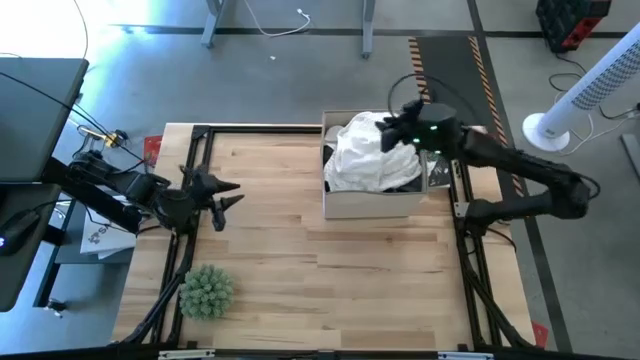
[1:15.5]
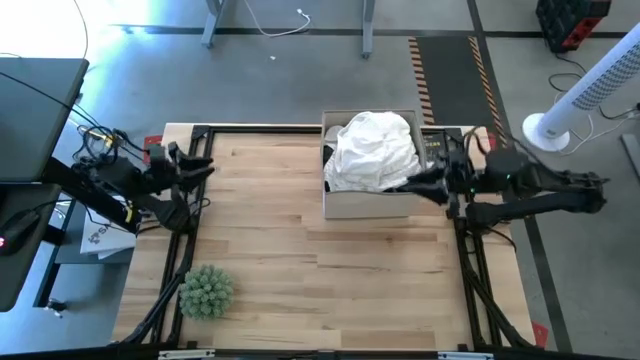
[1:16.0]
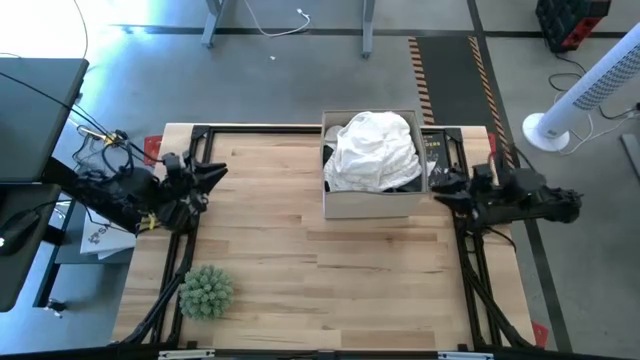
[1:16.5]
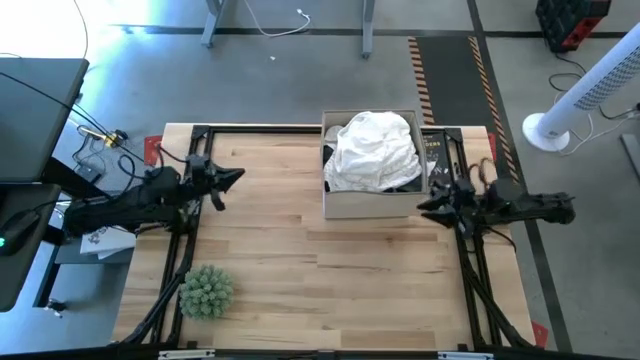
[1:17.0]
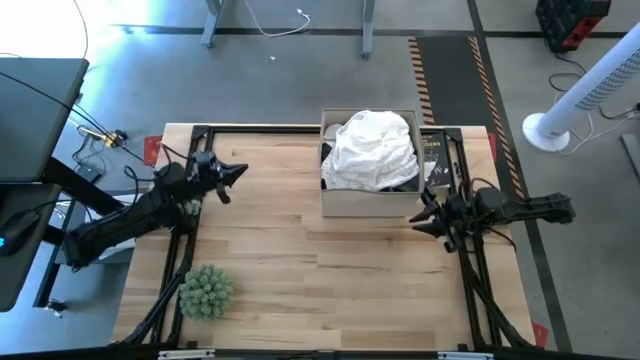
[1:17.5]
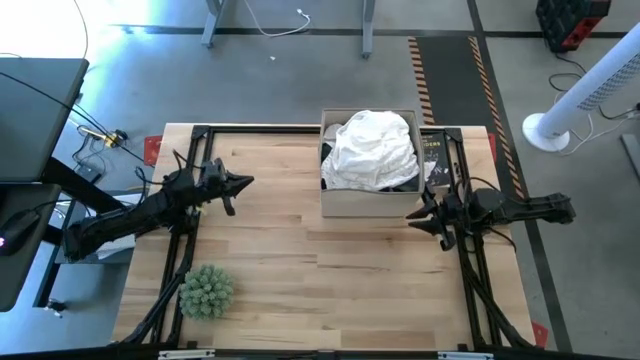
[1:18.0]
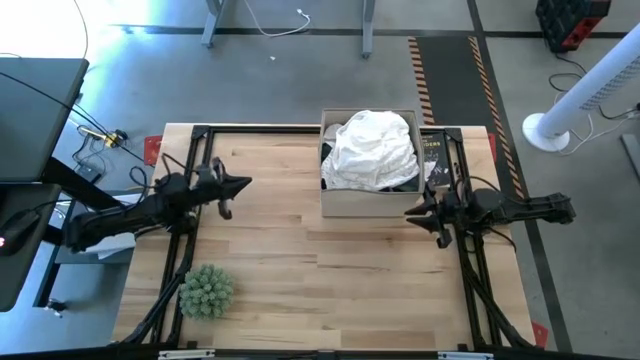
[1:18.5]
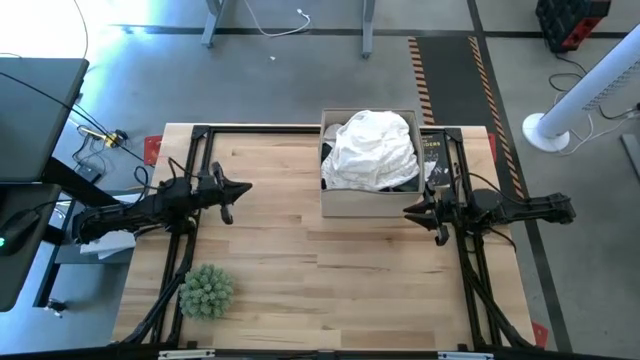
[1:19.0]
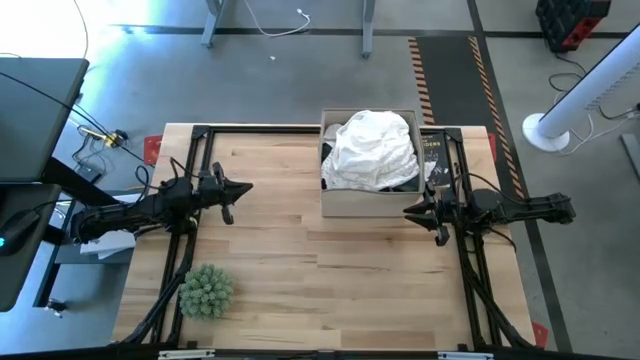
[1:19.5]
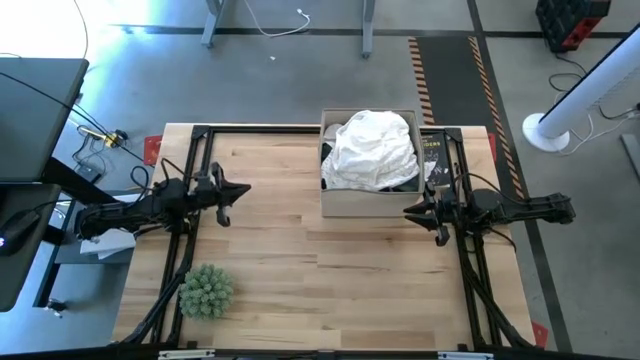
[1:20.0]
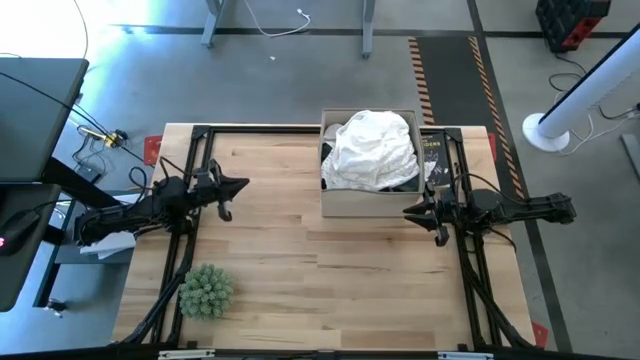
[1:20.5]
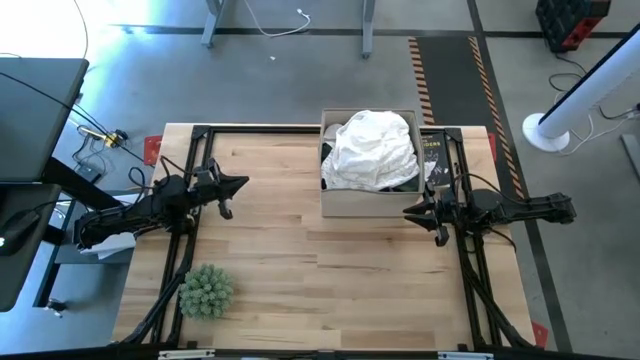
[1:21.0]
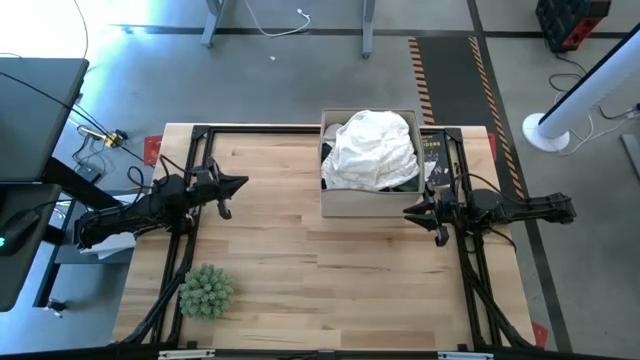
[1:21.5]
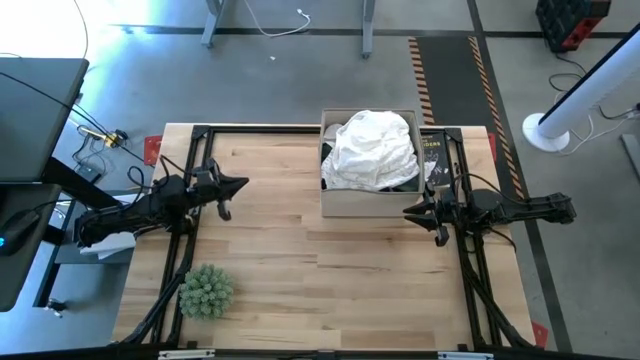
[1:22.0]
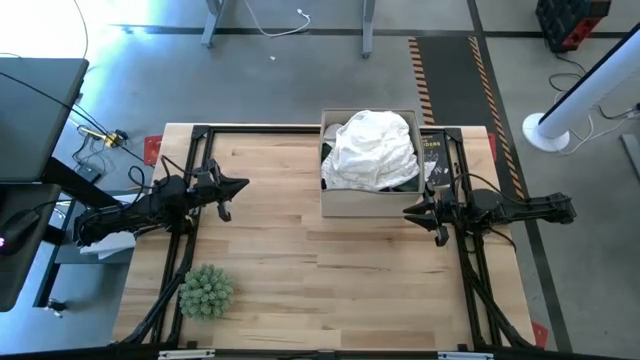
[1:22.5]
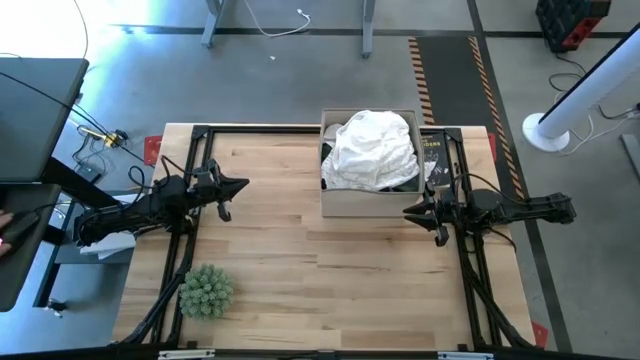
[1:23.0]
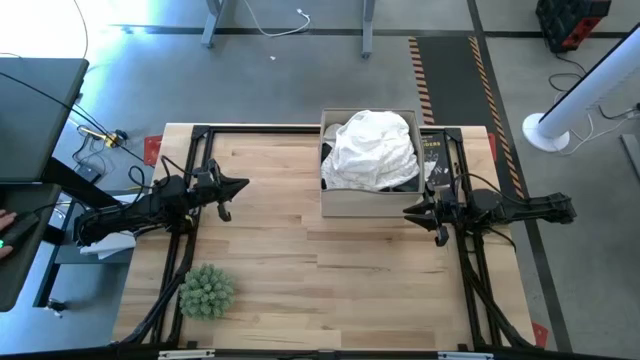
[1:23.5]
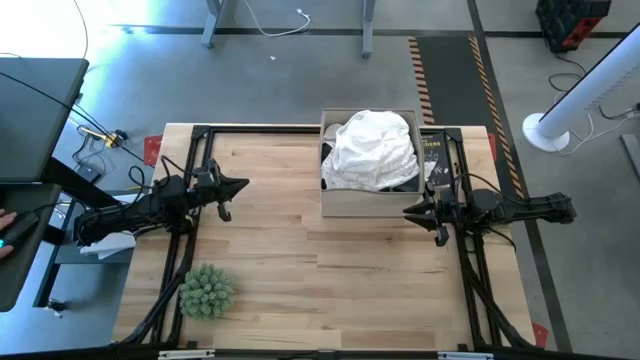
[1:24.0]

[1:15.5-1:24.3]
Task: Sort clothes
Return to Home Position

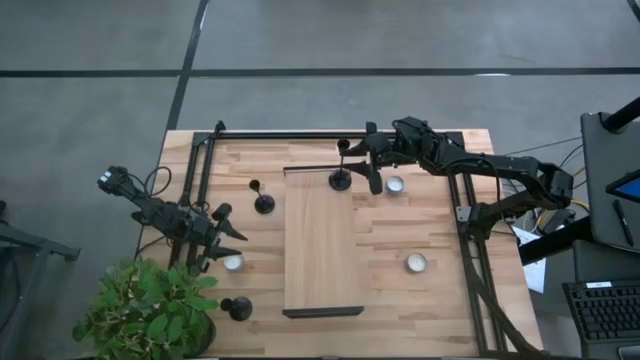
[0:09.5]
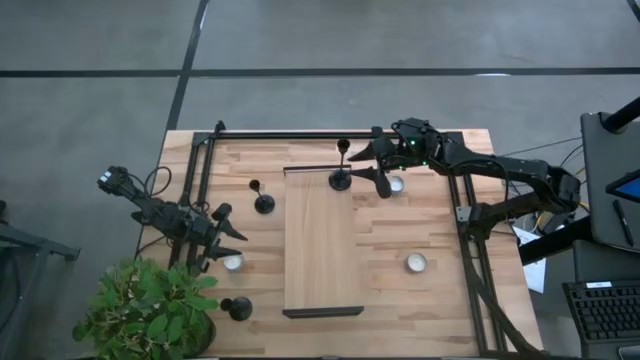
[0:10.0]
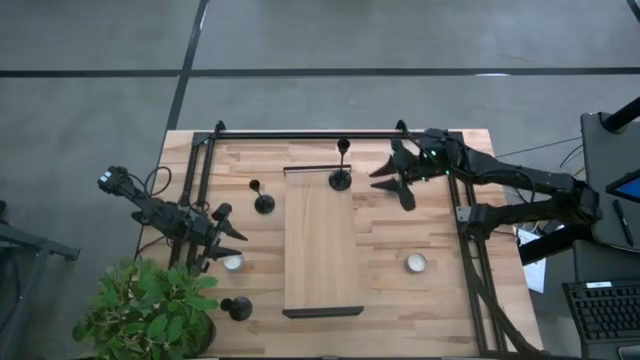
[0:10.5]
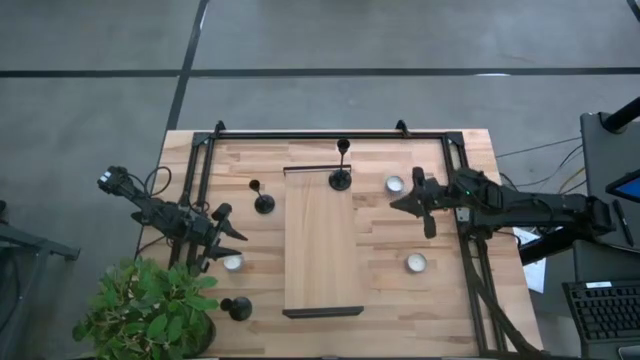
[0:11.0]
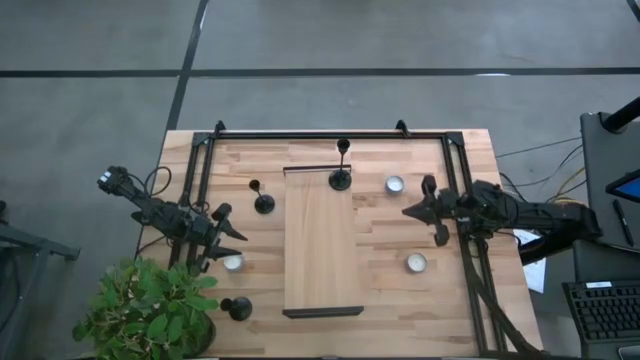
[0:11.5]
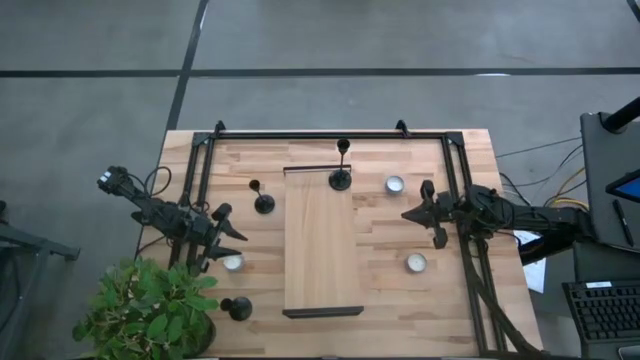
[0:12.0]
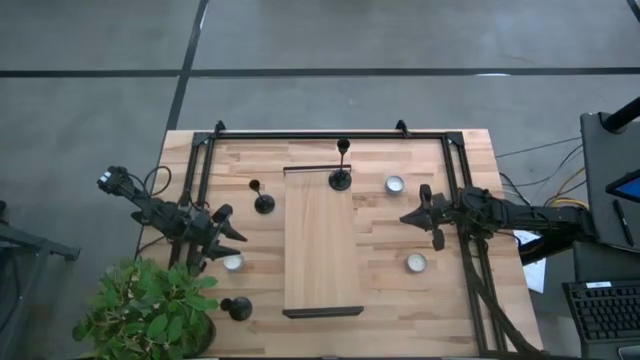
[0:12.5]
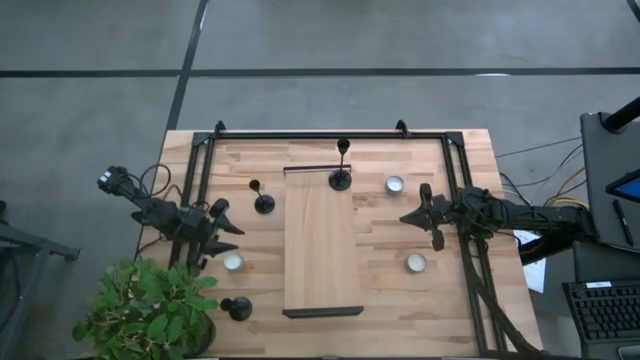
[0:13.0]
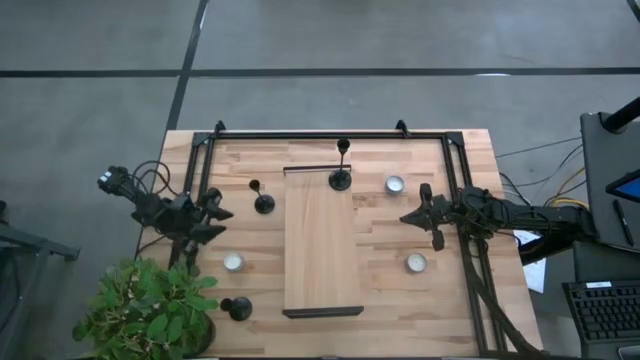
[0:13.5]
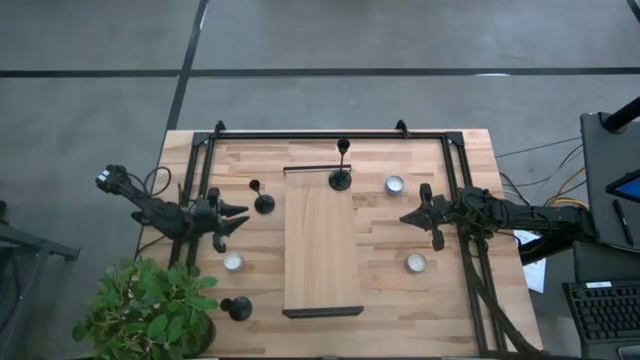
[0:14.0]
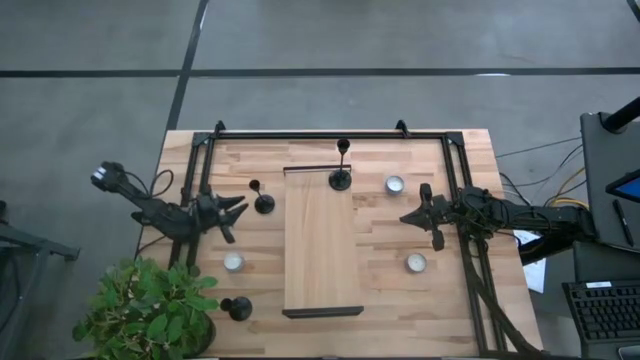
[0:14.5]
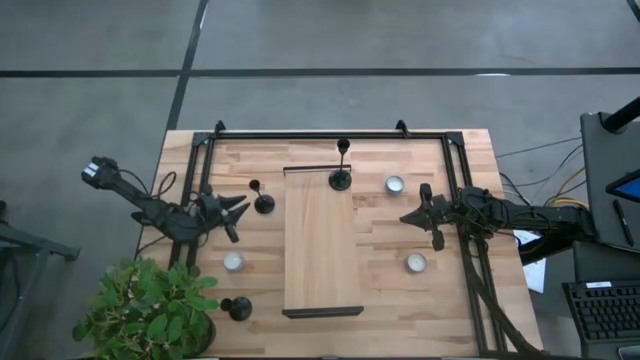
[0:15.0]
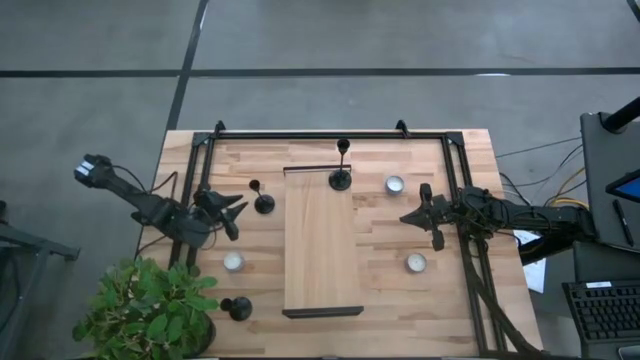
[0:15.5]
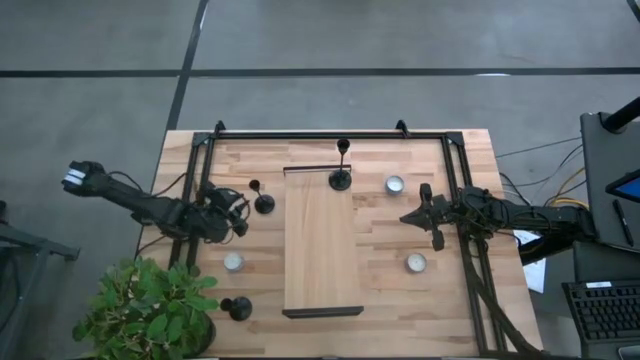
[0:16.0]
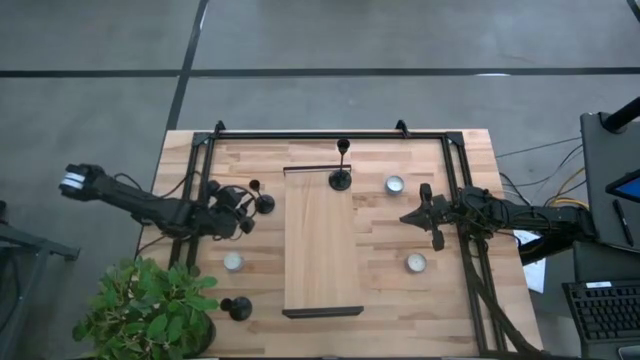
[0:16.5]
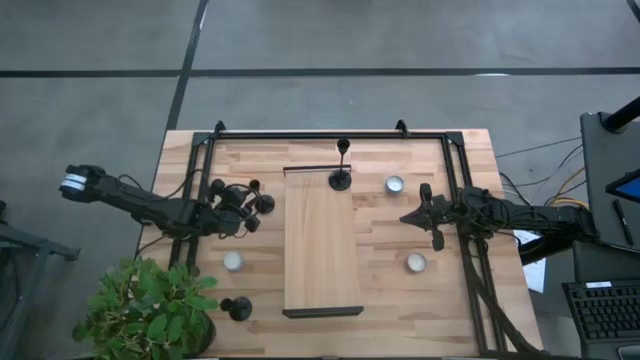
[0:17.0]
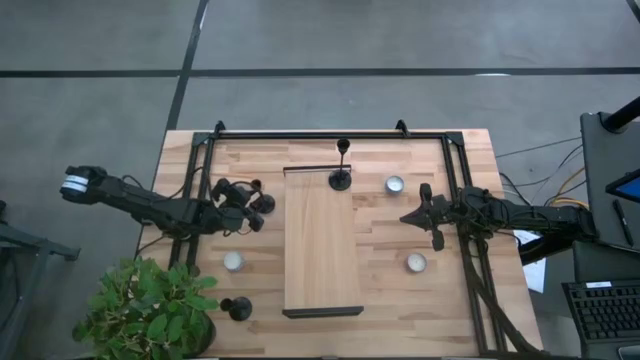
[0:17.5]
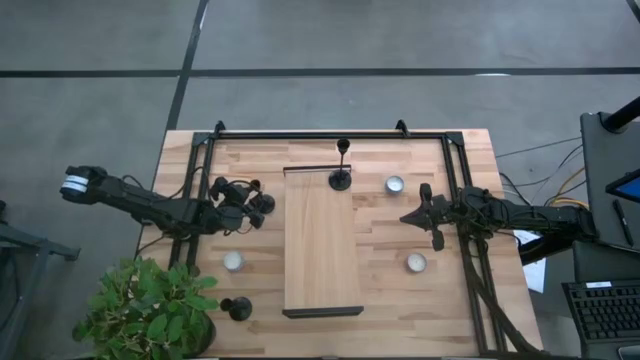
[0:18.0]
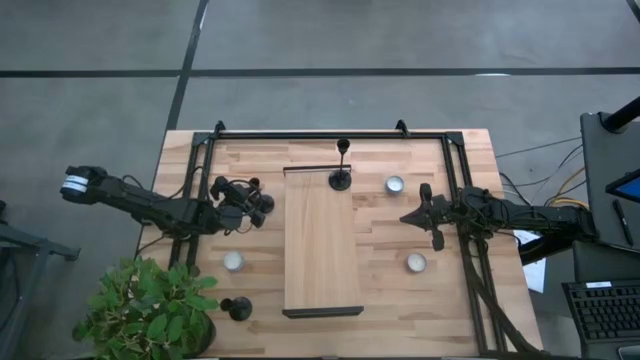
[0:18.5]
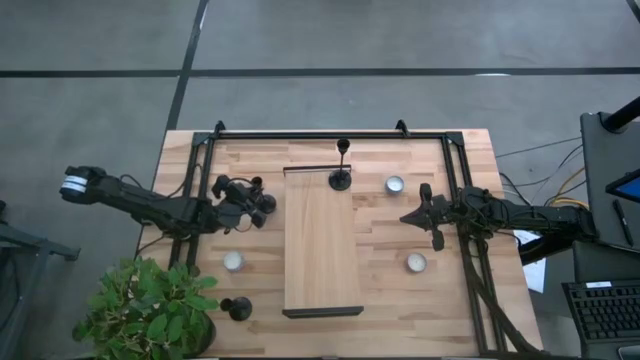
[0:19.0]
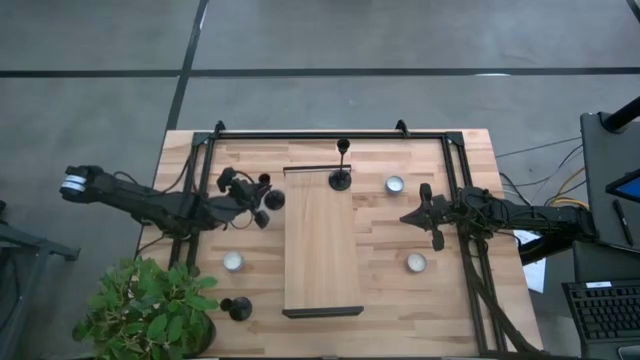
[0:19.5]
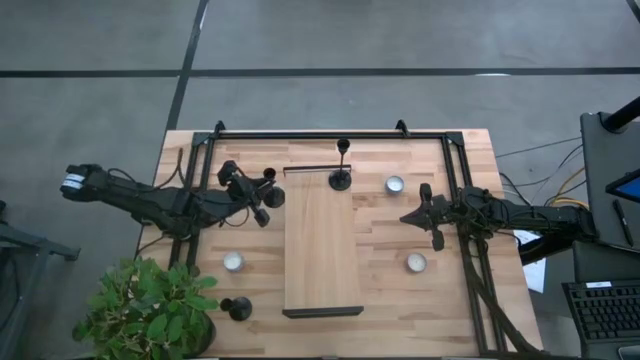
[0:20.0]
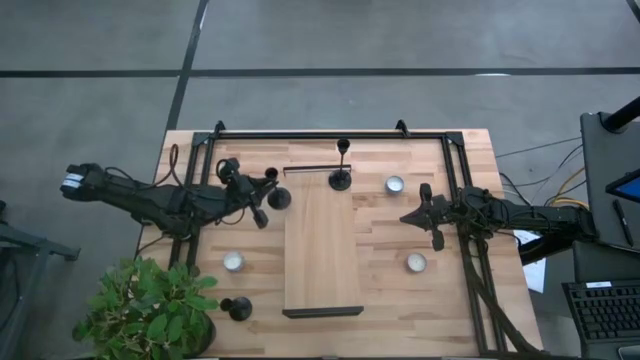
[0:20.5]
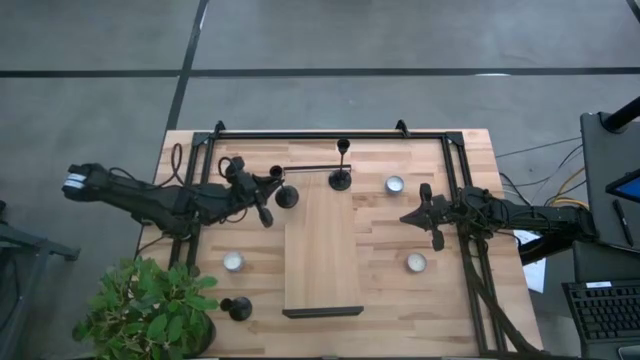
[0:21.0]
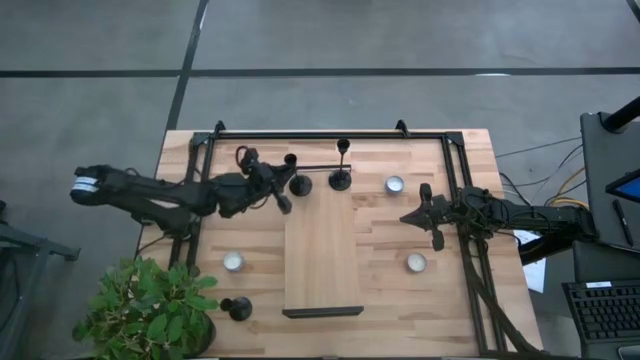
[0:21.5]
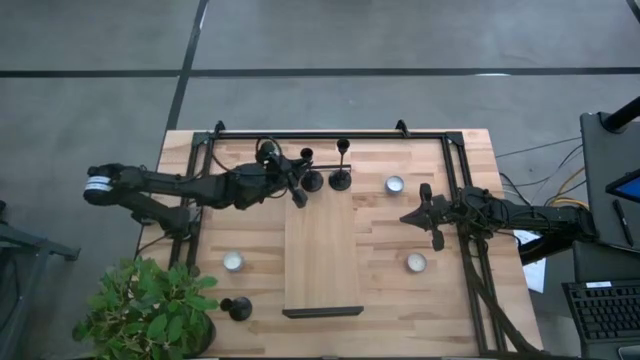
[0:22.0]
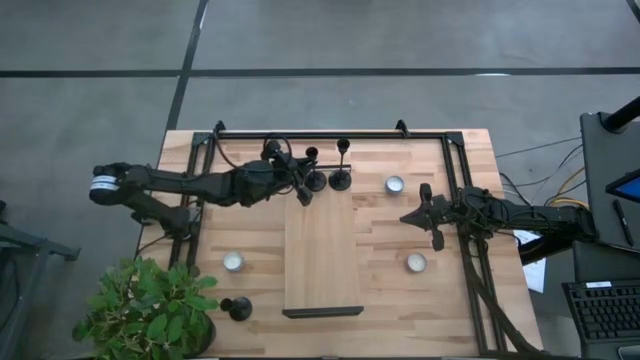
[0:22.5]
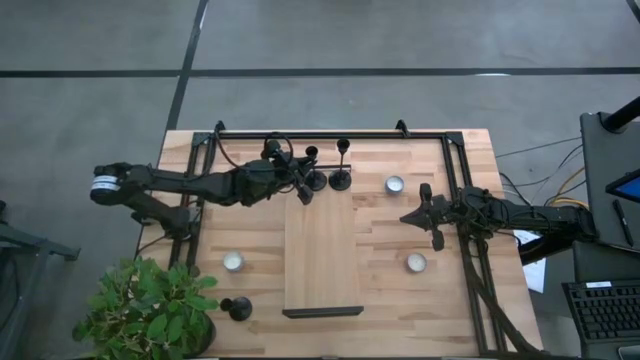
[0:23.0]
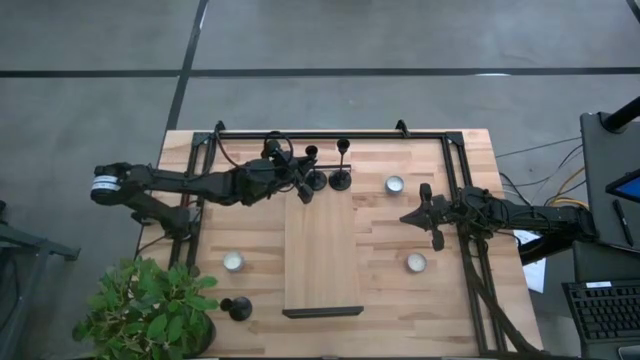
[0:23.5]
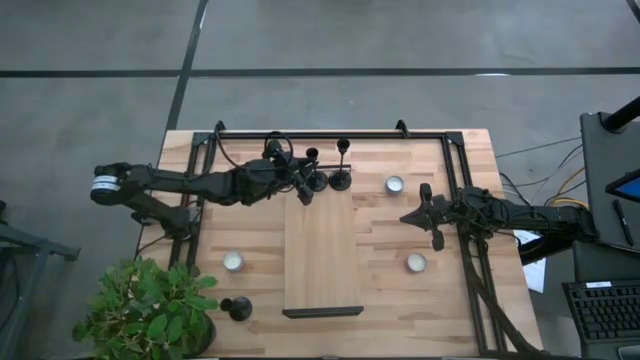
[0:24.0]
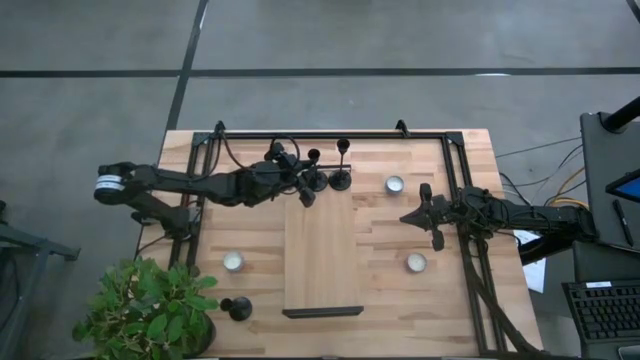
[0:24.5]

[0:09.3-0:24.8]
Task: Pick & Place candle stick holders
Put the top black candle holder on the shelf aligned with the other black candle holder
